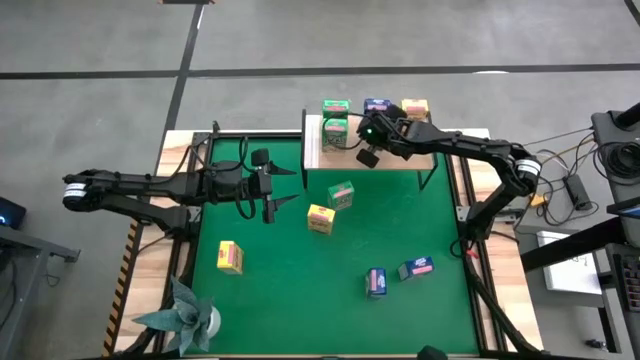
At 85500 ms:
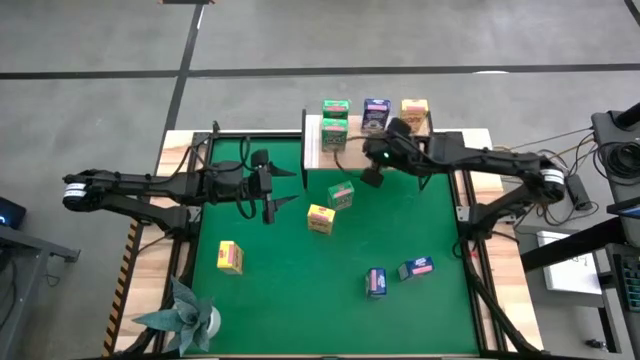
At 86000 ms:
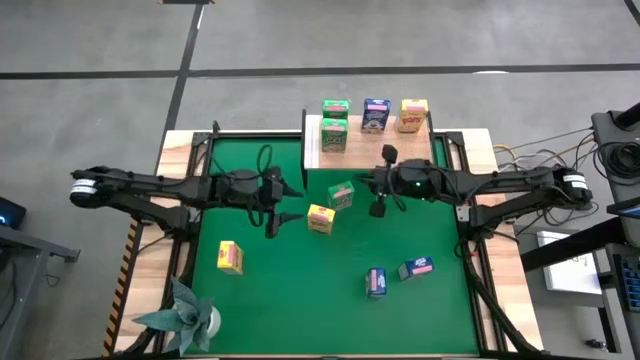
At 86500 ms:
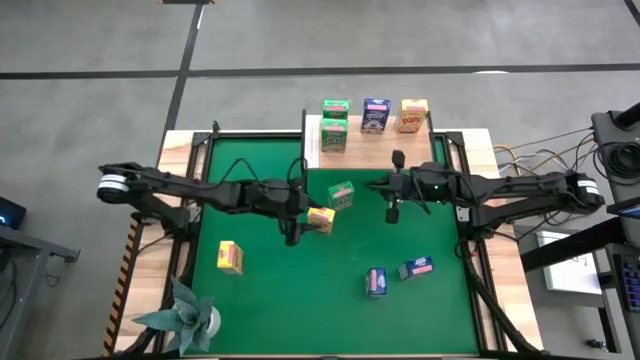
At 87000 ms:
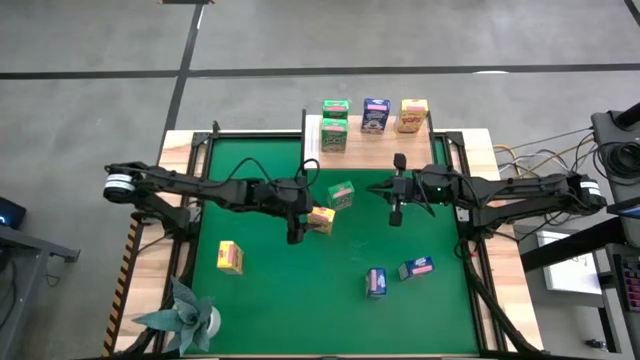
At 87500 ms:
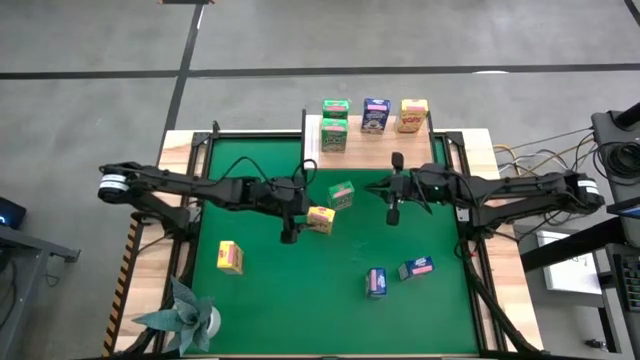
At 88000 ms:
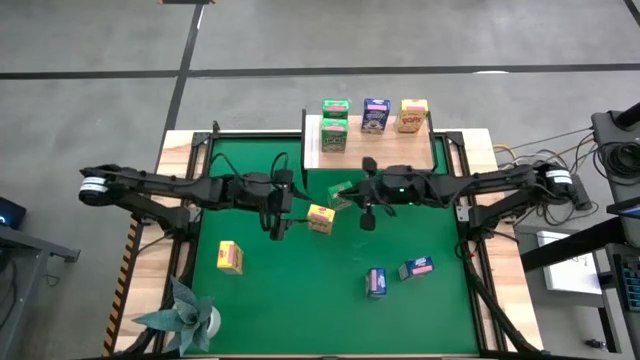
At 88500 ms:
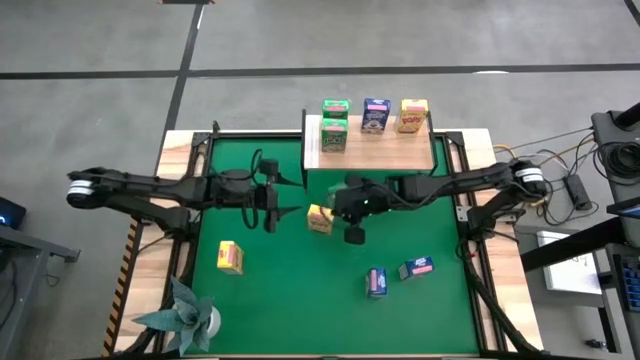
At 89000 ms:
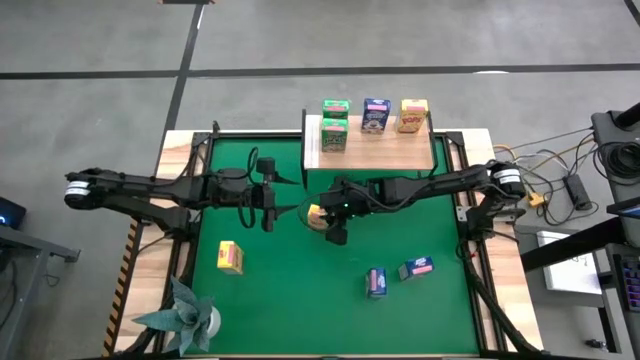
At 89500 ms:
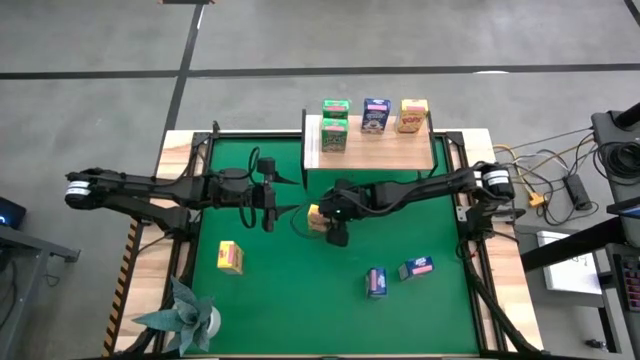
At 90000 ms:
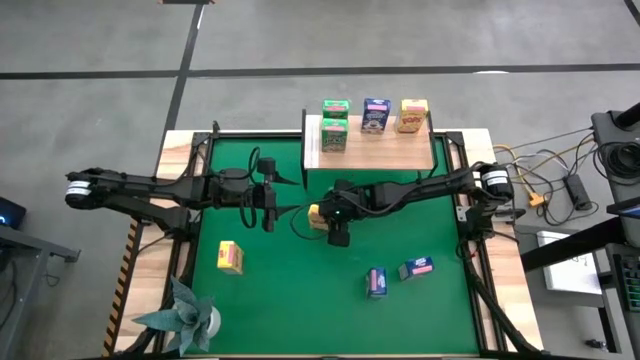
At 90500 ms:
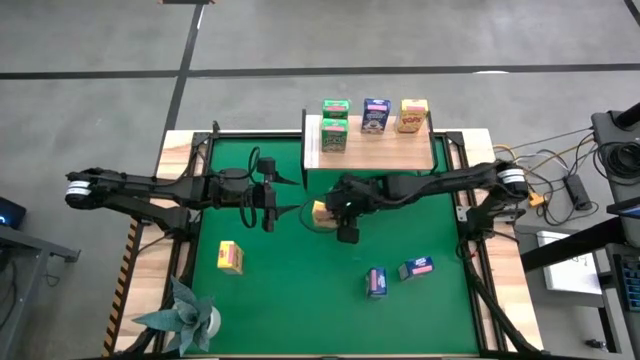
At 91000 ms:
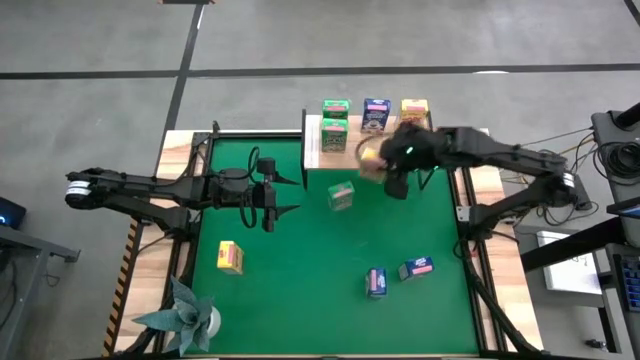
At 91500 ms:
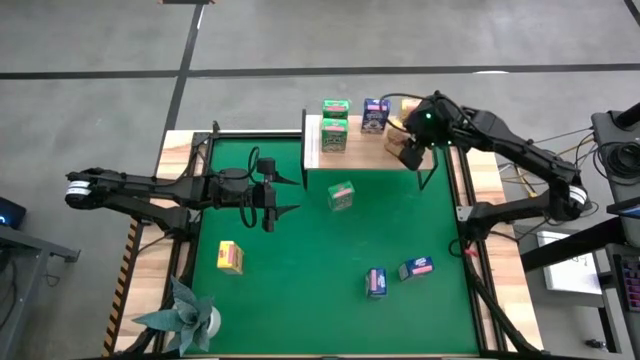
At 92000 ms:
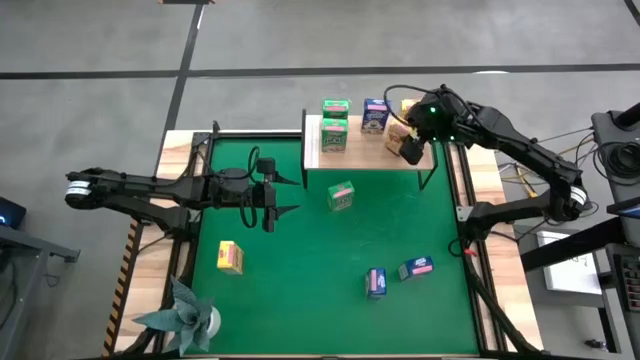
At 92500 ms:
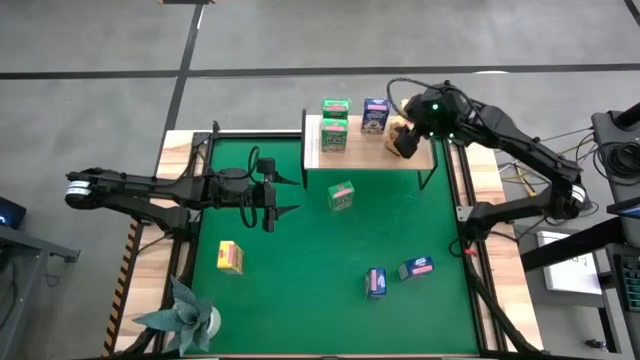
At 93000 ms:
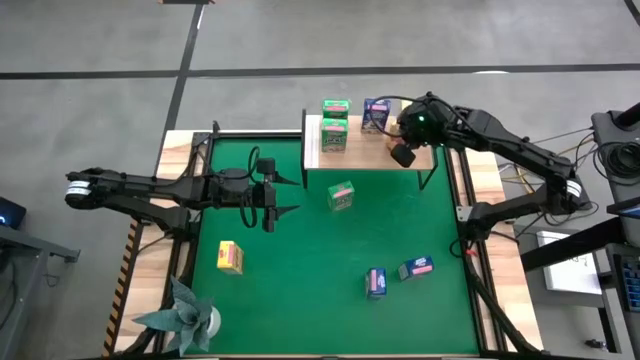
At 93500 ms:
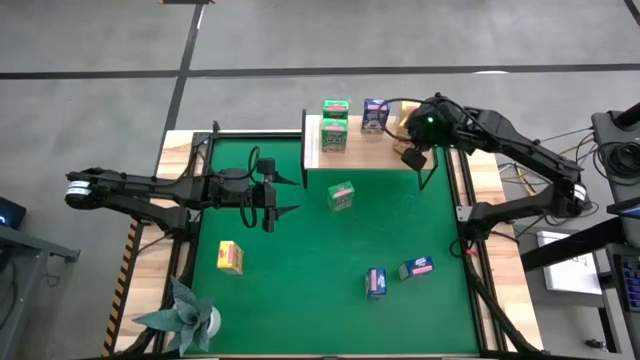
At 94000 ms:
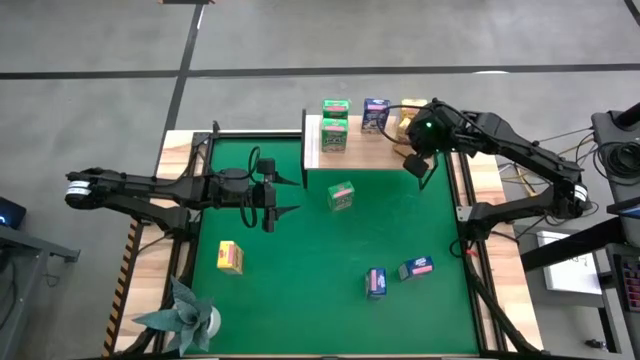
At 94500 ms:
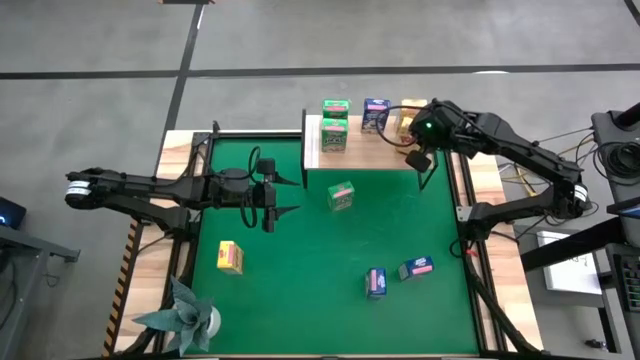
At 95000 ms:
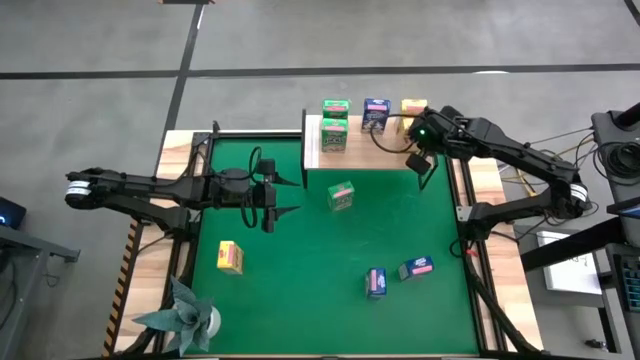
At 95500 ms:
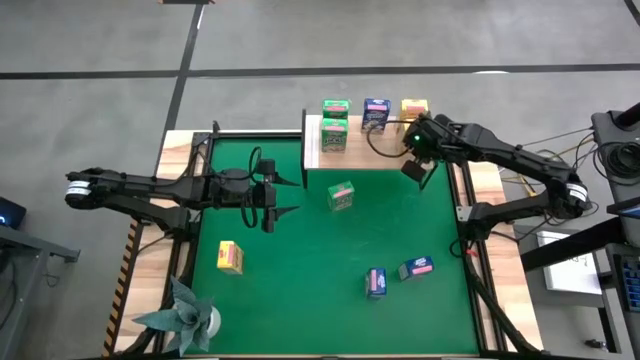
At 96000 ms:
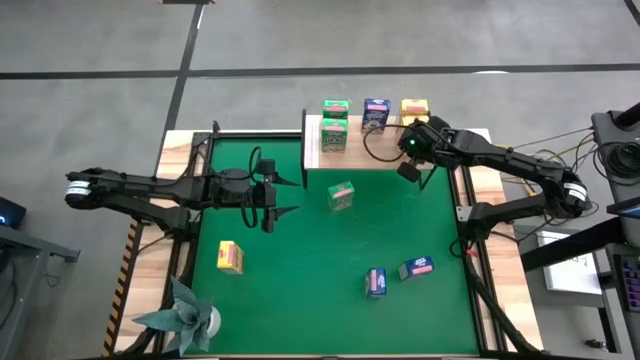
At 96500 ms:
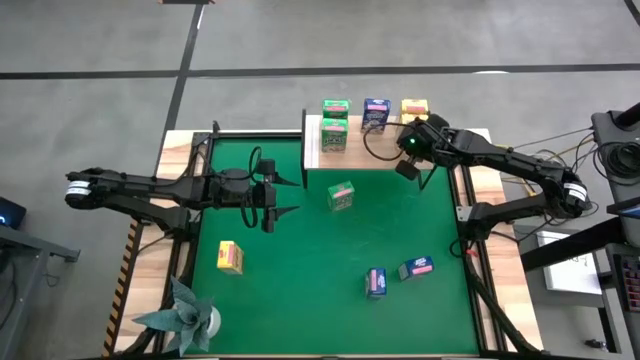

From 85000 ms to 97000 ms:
Task: Stack cereal on shelf
Put the top yellow cereal box on the shelf aligned with the other yellow cereal box

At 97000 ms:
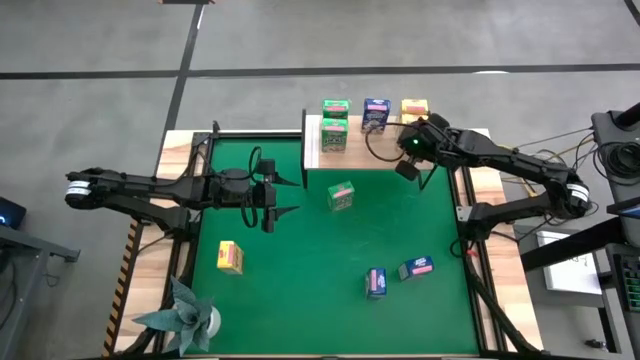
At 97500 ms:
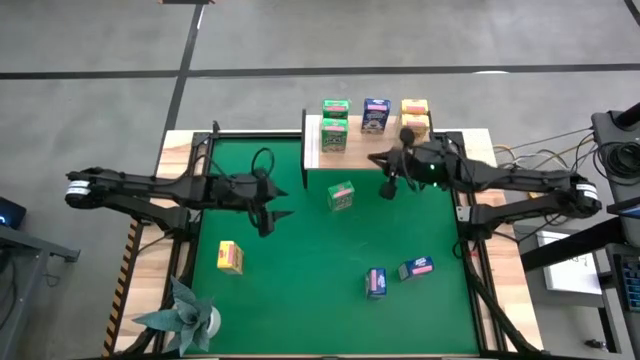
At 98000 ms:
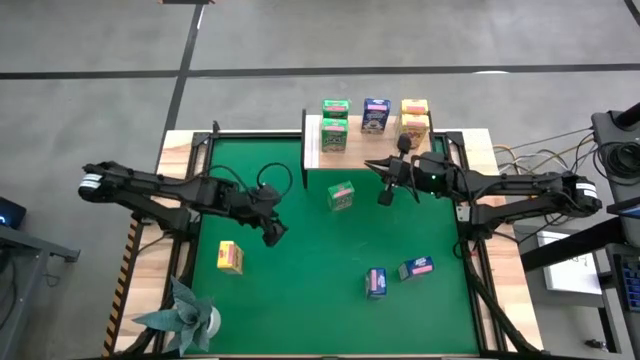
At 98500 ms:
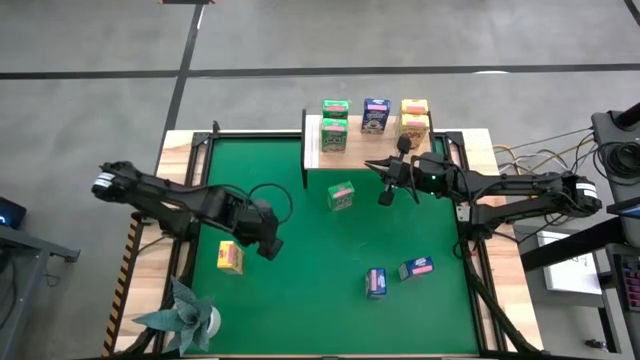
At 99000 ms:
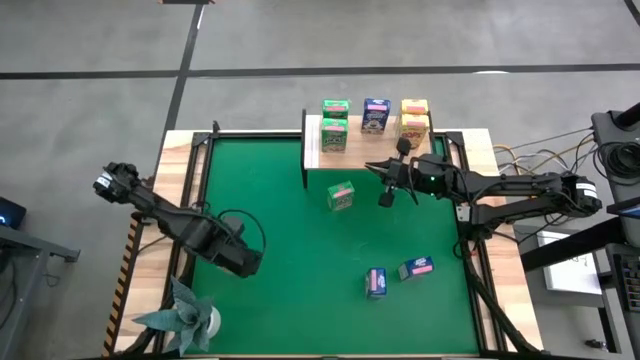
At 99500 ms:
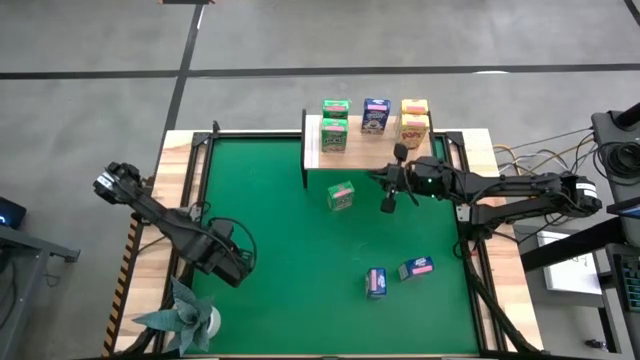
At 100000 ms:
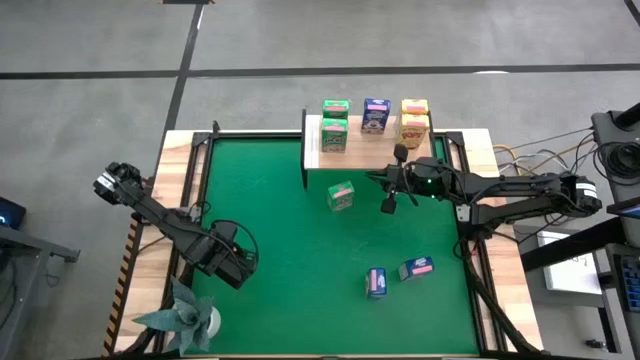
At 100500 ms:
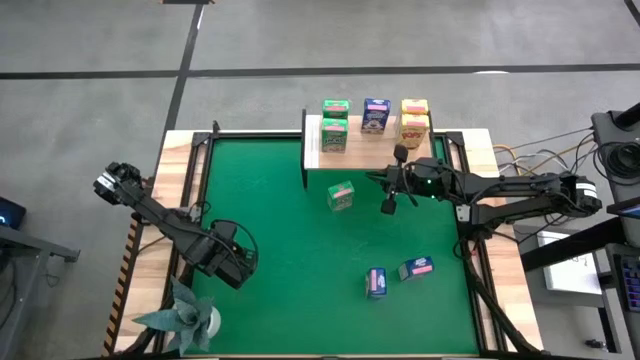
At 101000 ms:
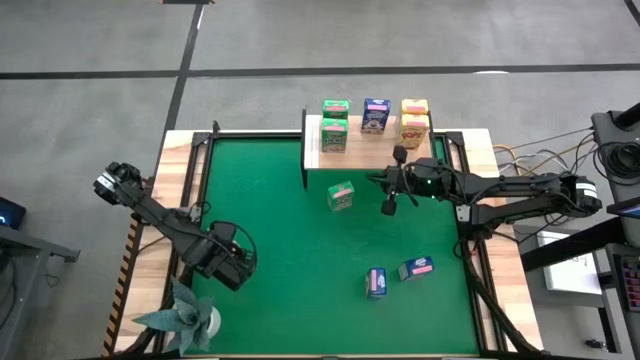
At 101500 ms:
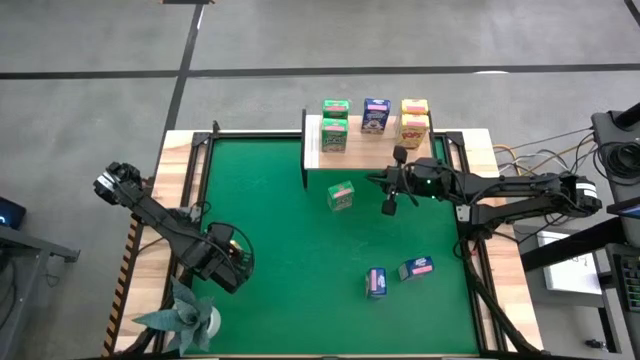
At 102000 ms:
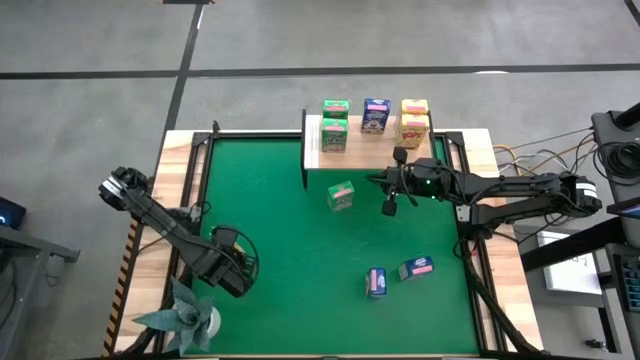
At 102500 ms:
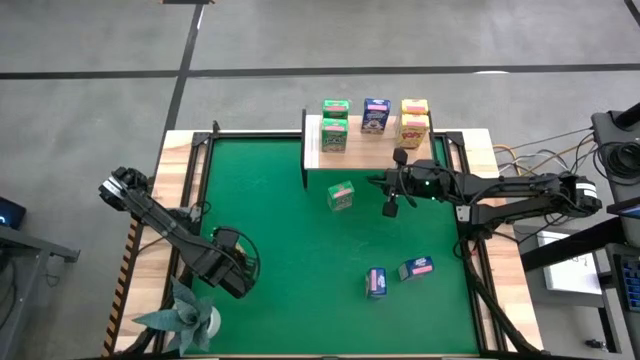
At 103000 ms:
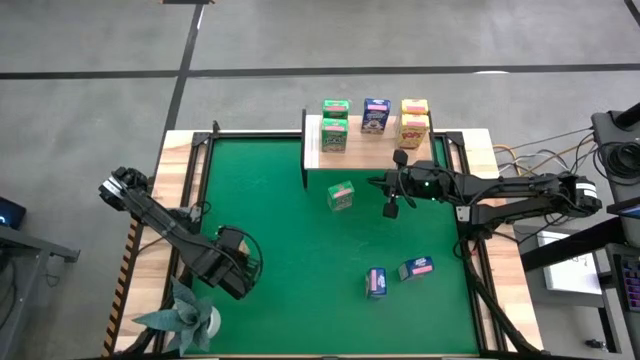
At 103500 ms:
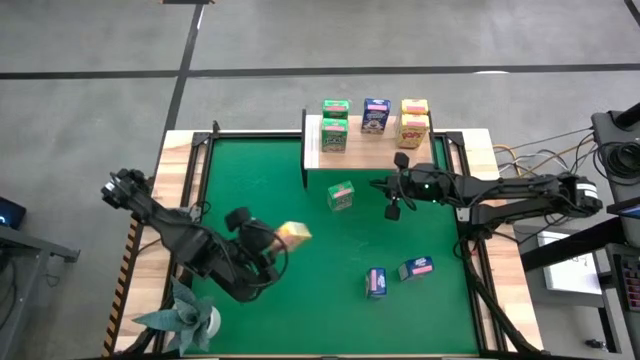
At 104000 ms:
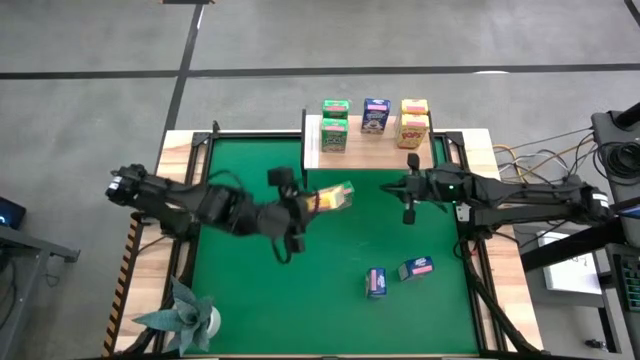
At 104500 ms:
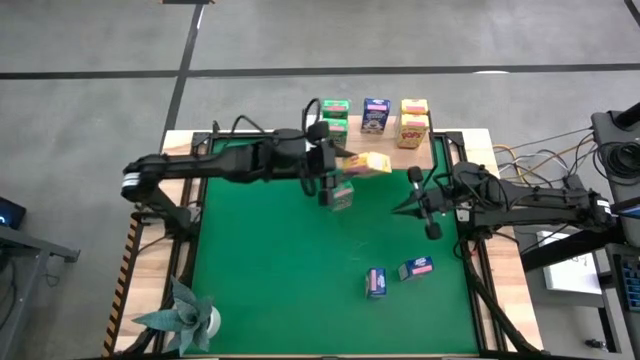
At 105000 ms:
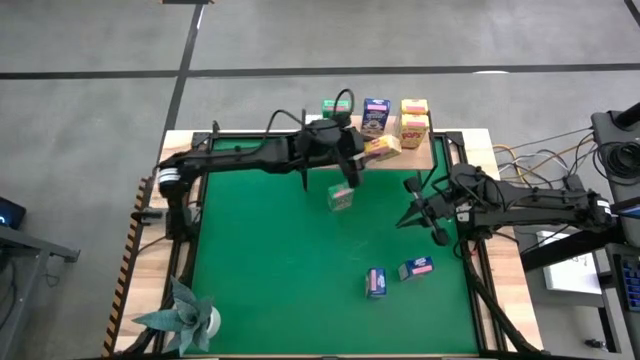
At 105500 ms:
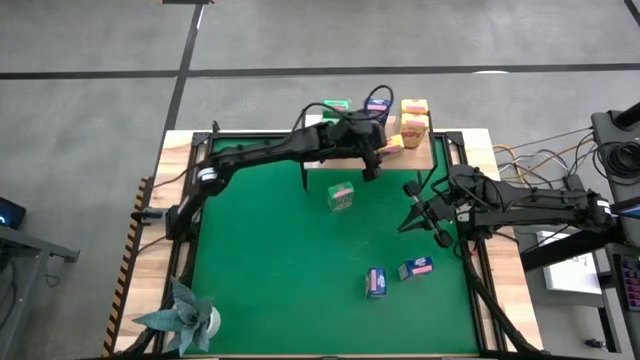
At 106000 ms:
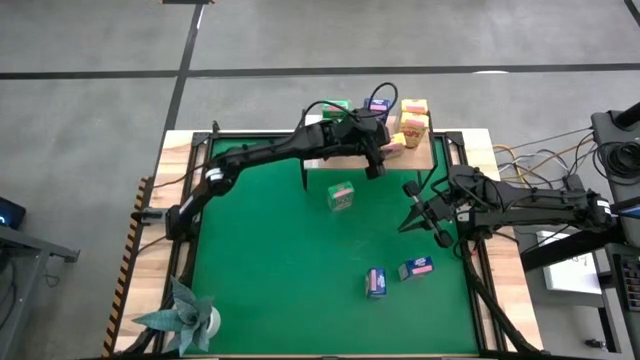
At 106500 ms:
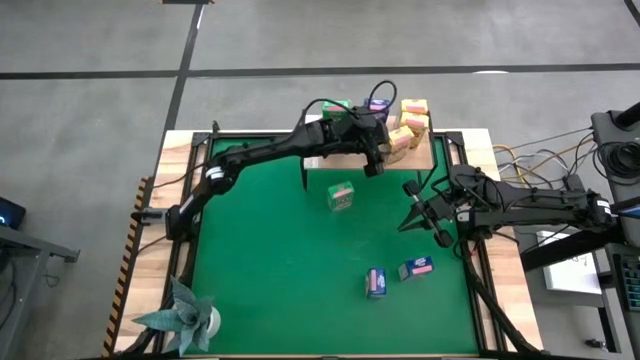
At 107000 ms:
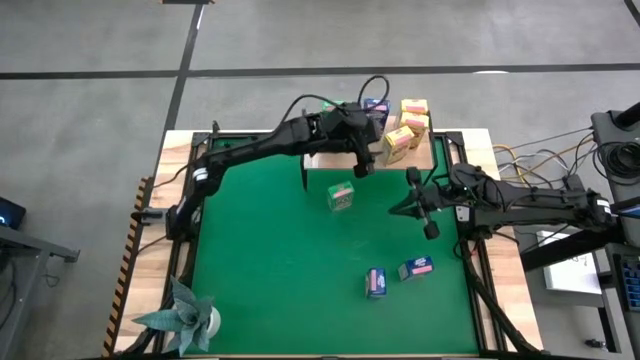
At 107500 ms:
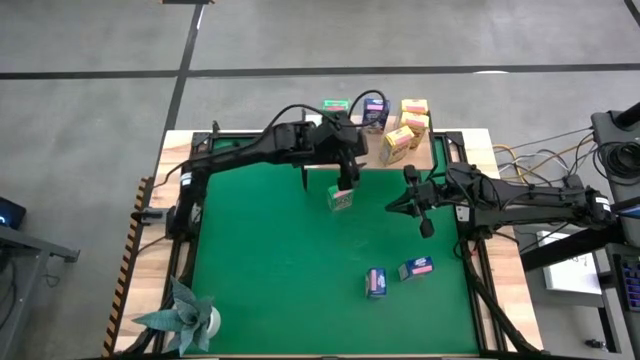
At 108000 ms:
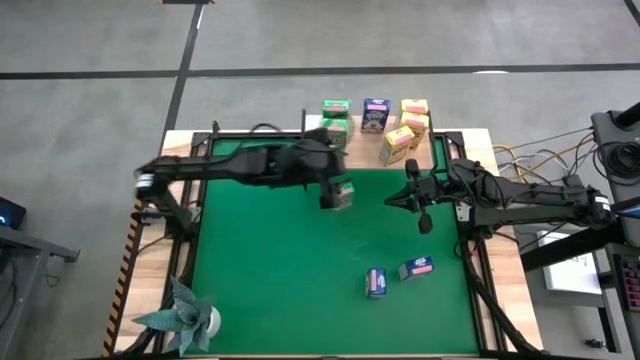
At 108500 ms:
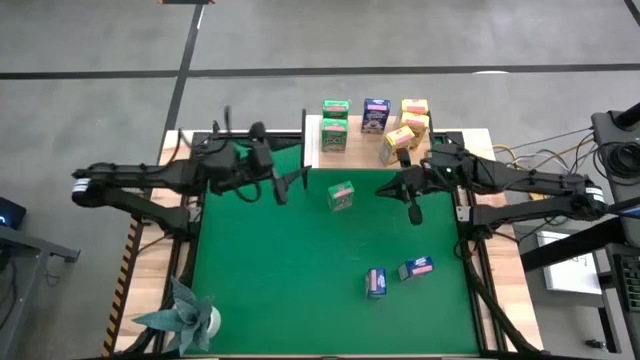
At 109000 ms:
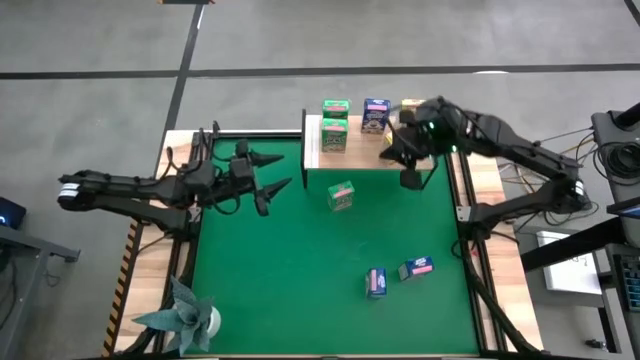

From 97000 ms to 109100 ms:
Put the yellow cereal box on the shelf aligned with the other yellow cereal box
